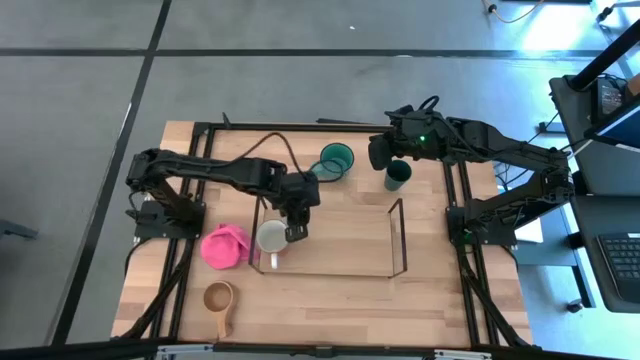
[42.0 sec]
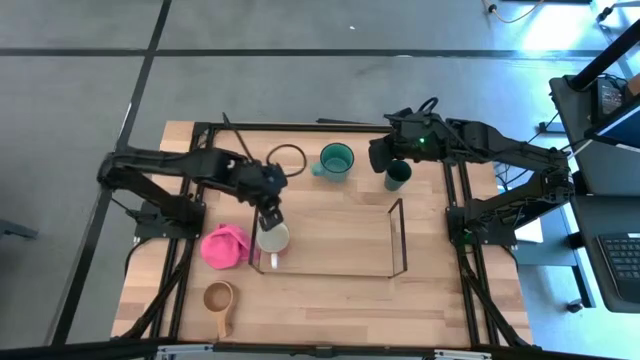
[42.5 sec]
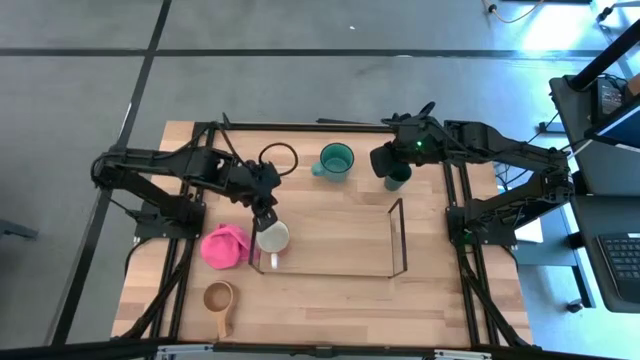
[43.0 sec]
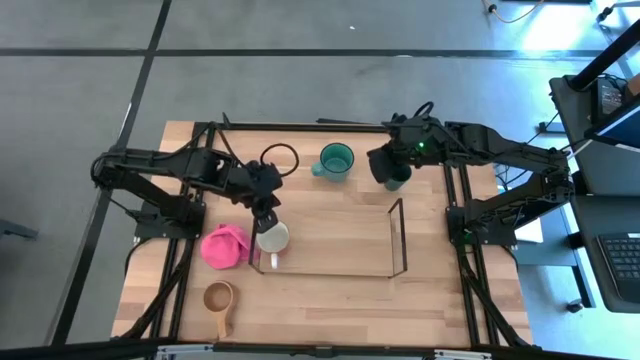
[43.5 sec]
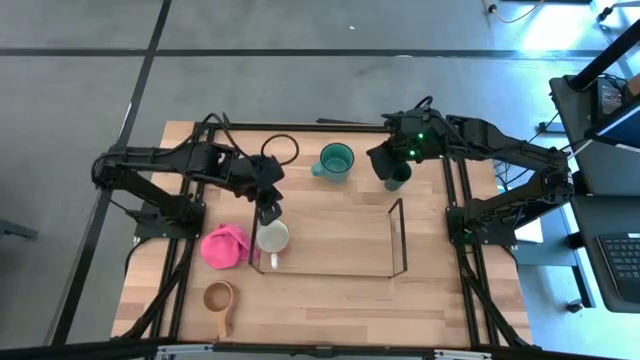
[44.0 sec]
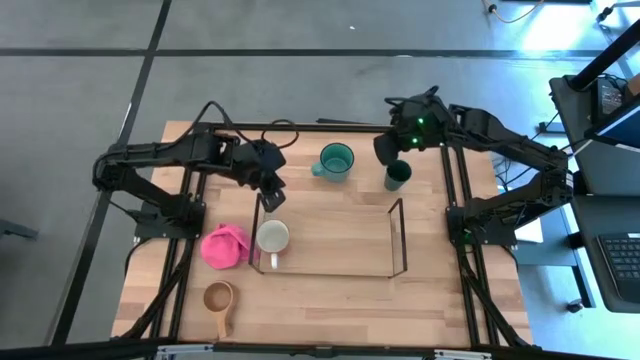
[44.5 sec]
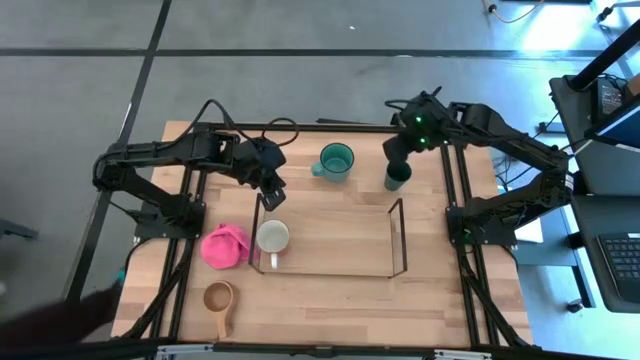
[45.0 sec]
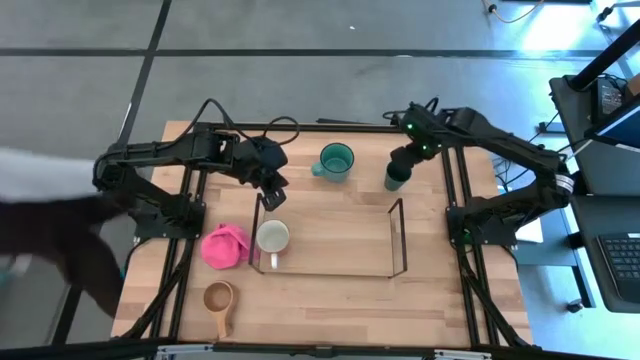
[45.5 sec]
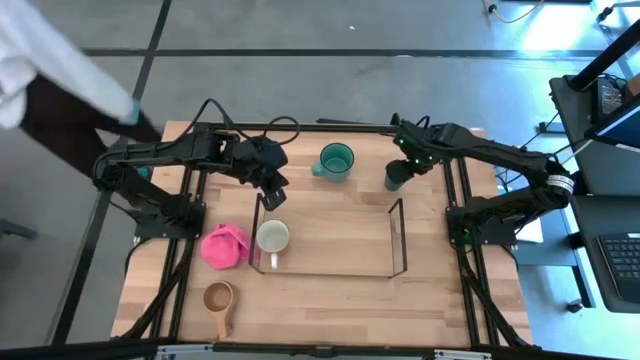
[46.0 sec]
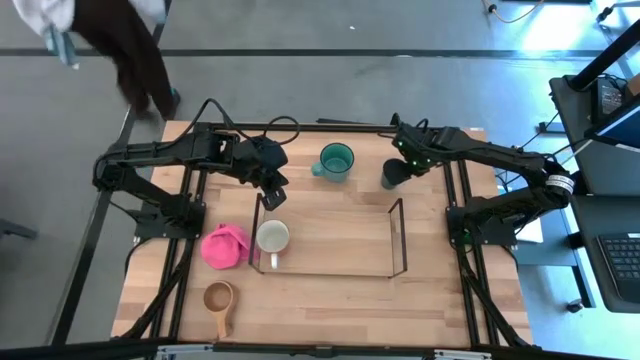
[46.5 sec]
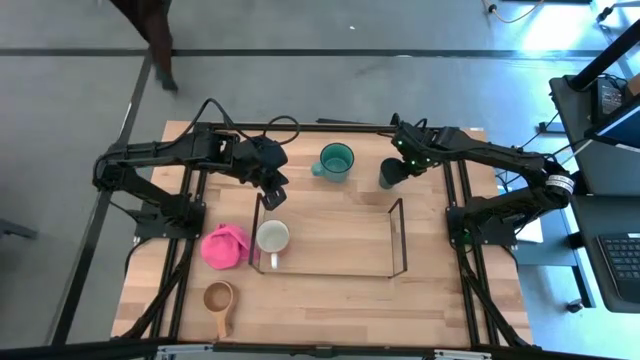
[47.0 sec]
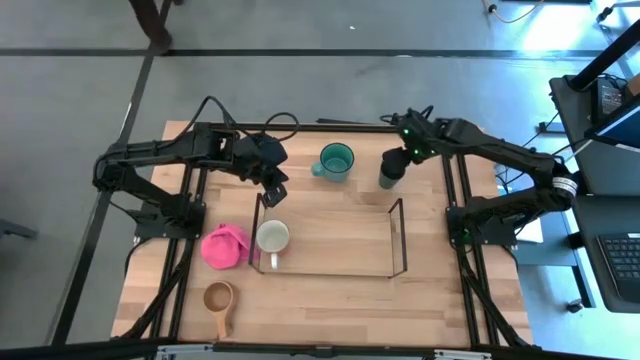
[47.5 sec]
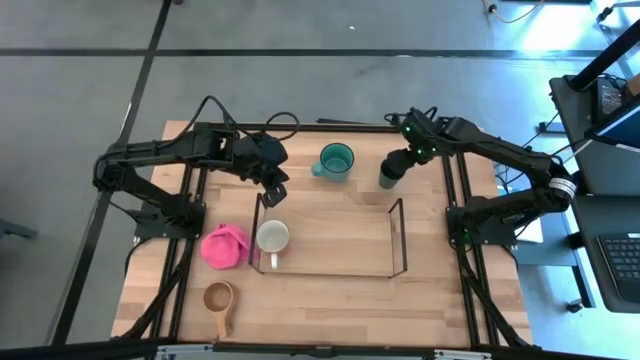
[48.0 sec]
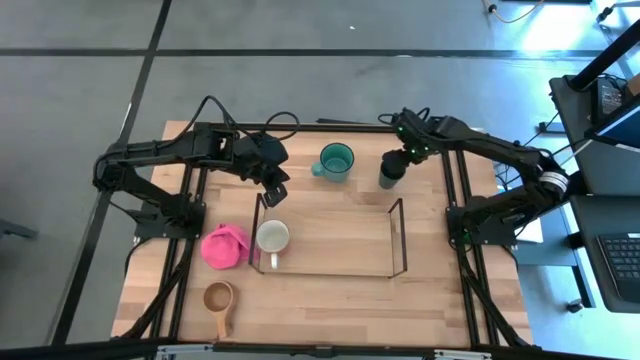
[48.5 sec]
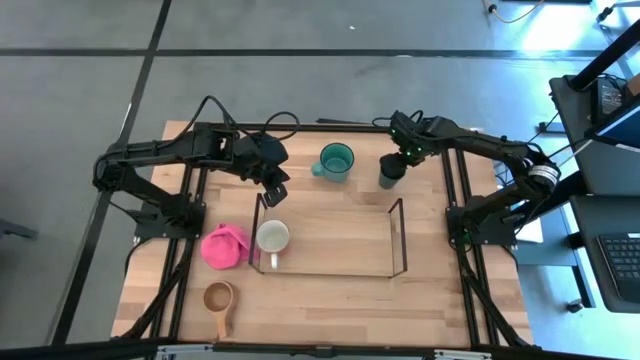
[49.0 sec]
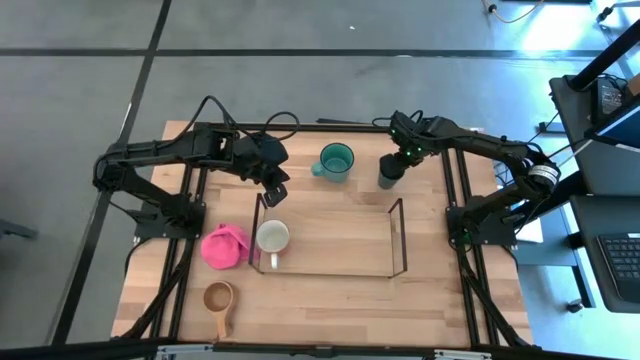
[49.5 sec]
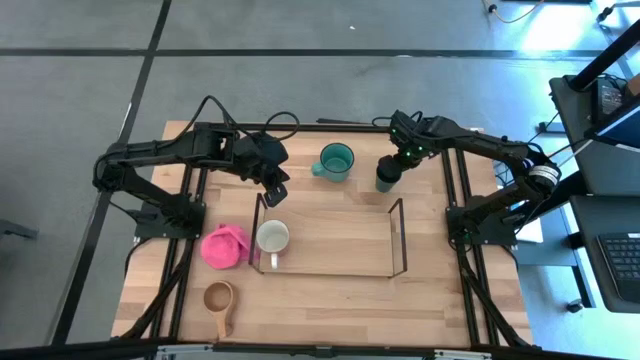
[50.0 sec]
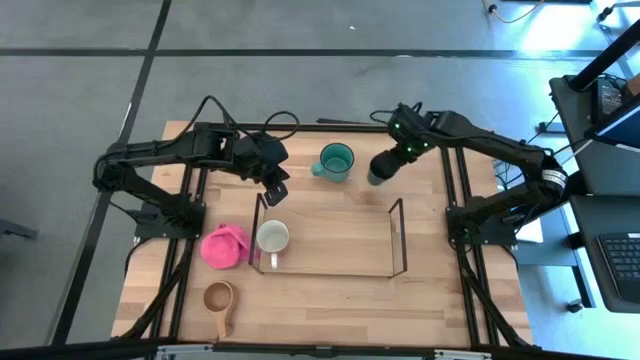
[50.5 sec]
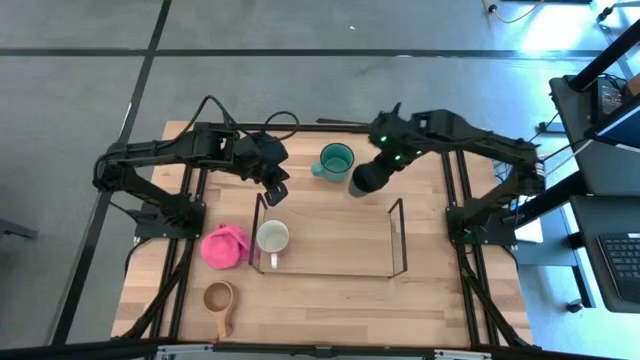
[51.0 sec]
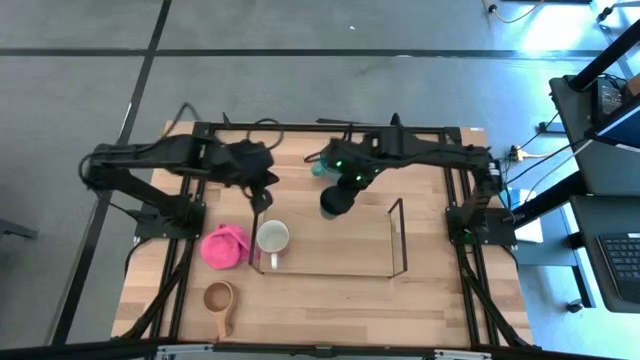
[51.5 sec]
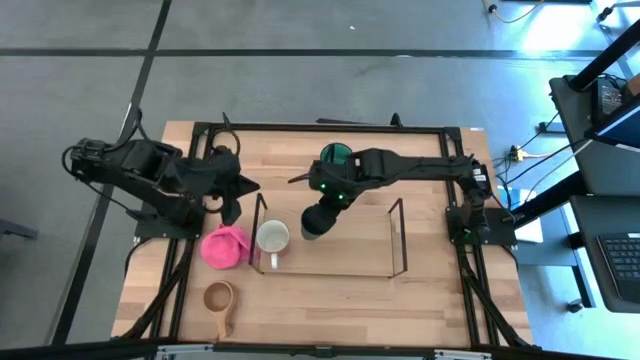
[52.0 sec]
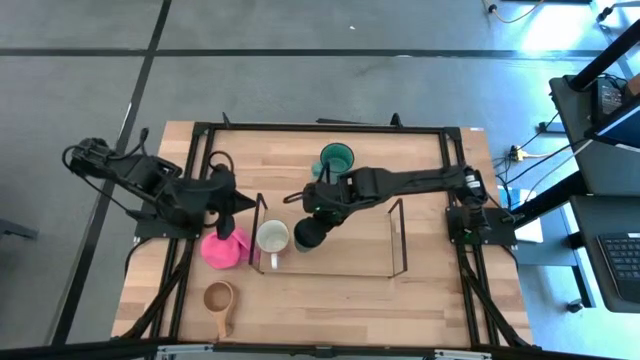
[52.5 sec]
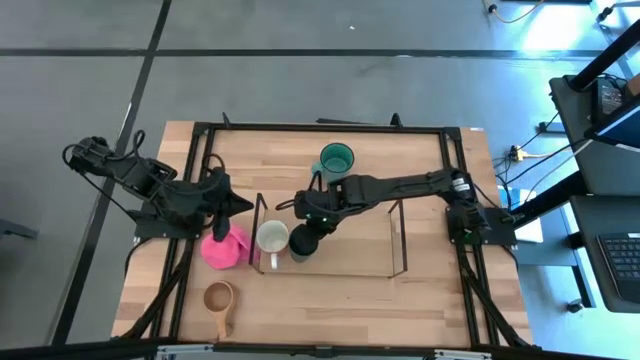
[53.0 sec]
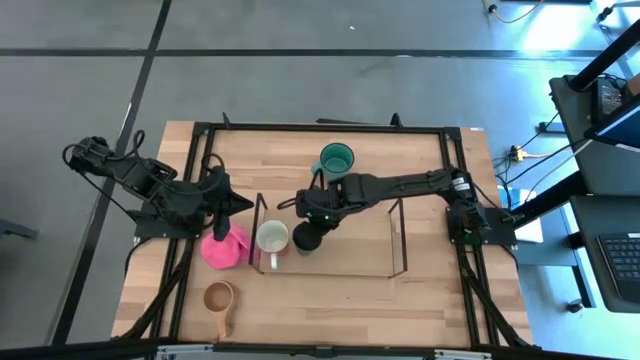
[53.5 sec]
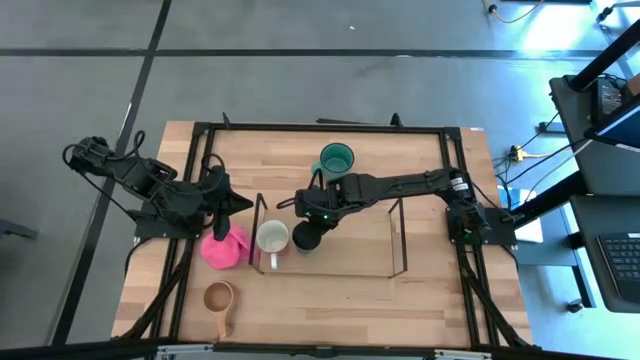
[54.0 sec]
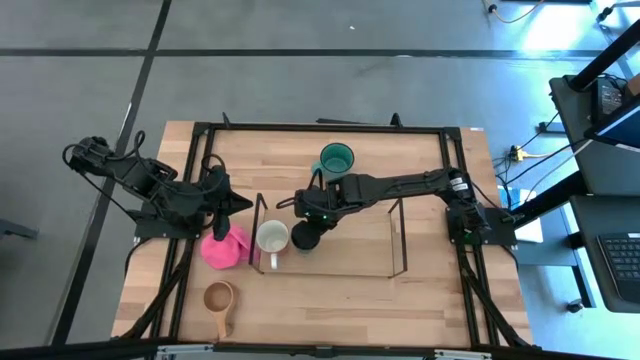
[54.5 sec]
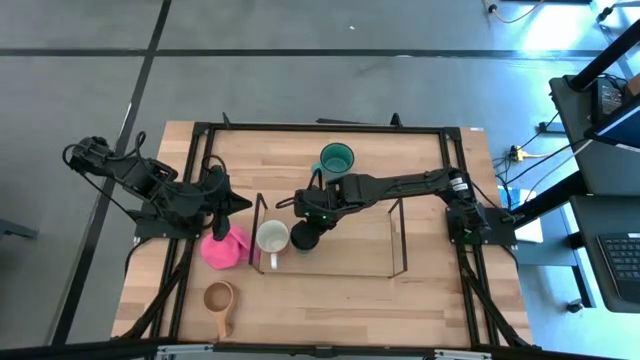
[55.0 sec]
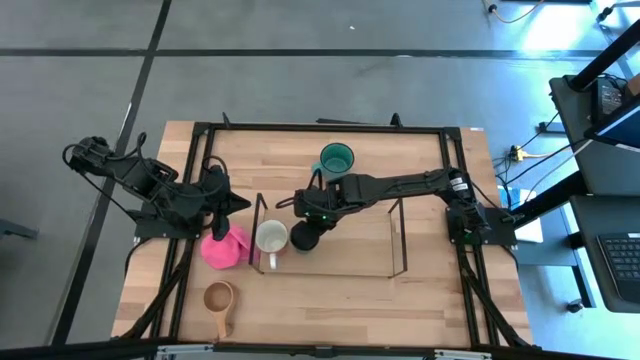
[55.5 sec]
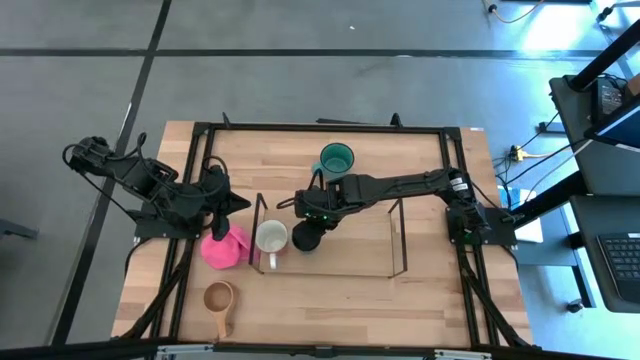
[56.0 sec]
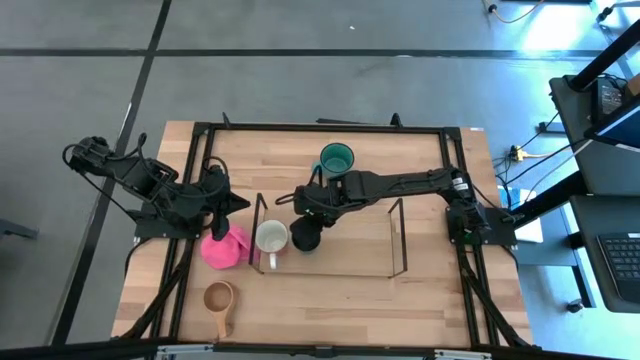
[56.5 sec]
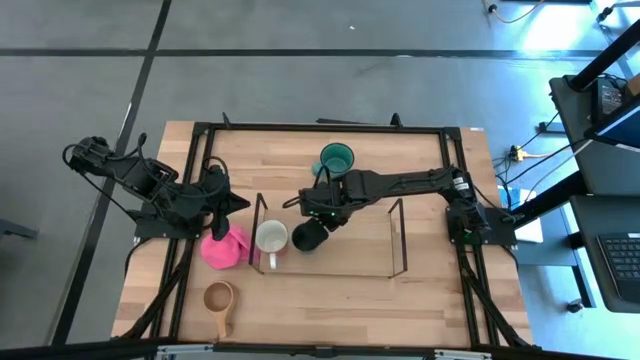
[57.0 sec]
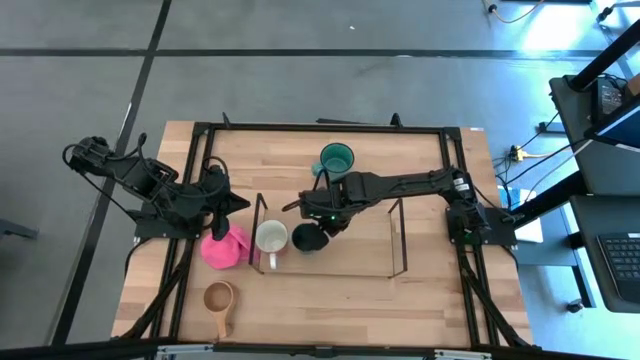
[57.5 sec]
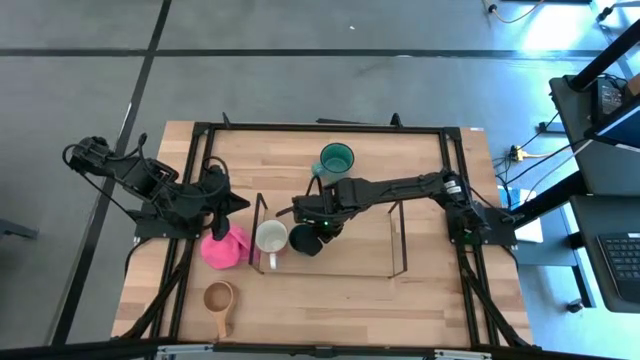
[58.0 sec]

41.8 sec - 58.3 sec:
Task: Stack small to large cups/mugs on shelf
Put the blue cup on the shelf

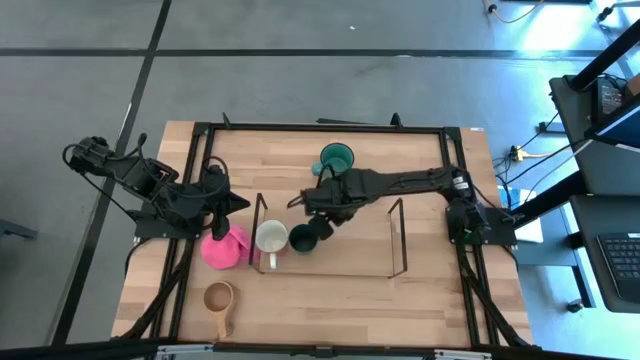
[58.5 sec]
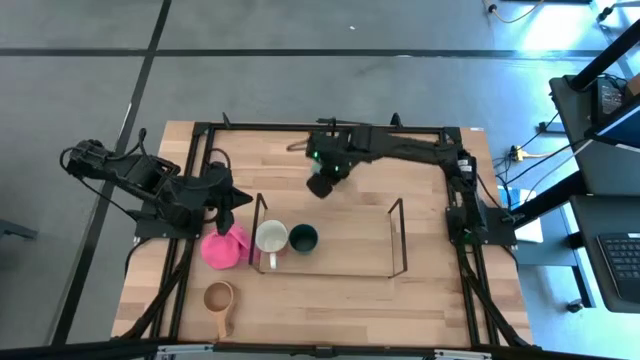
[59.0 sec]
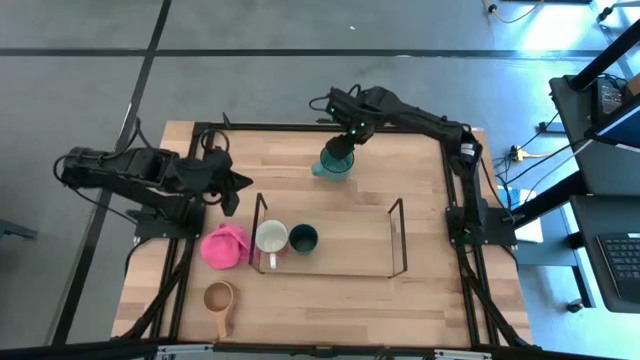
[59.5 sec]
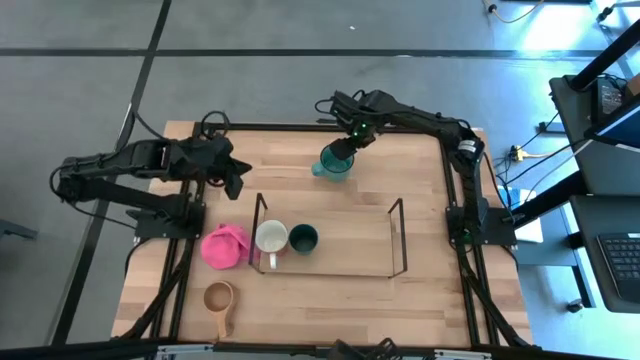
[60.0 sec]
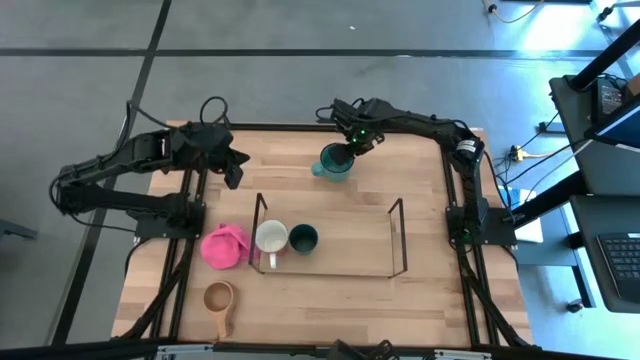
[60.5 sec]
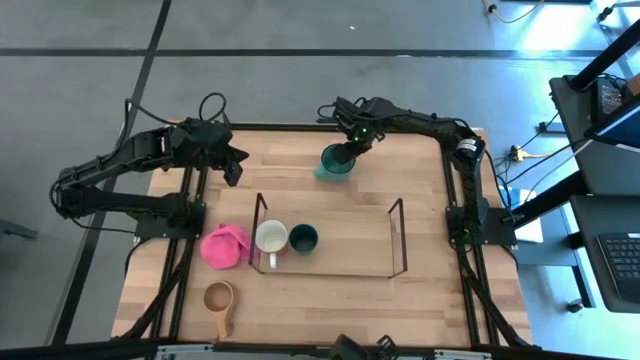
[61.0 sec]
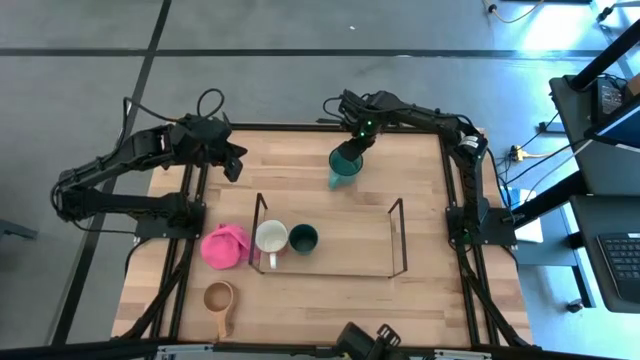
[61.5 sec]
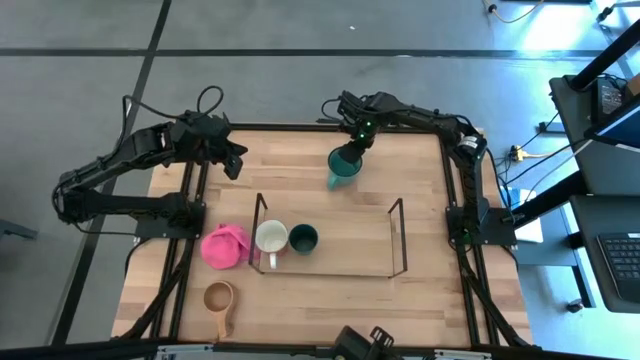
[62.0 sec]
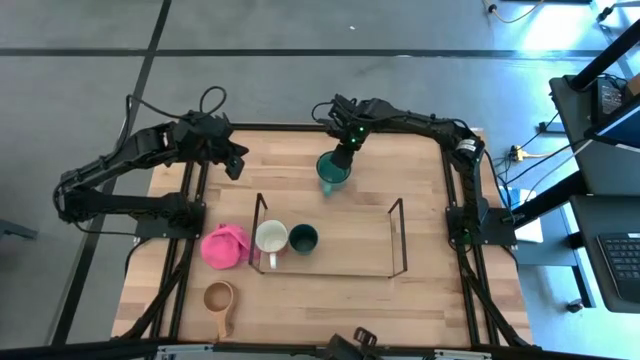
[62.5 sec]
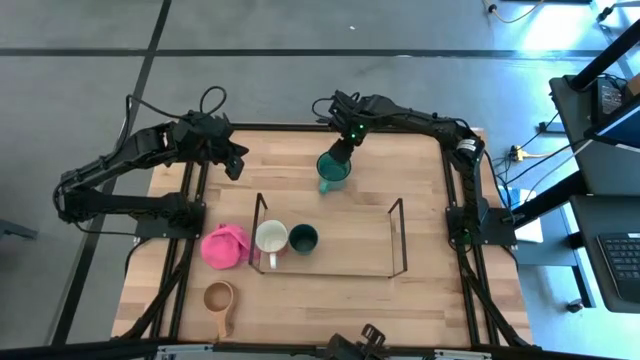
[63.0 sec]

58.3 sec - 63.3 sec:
Put the blue mug on the shelf
